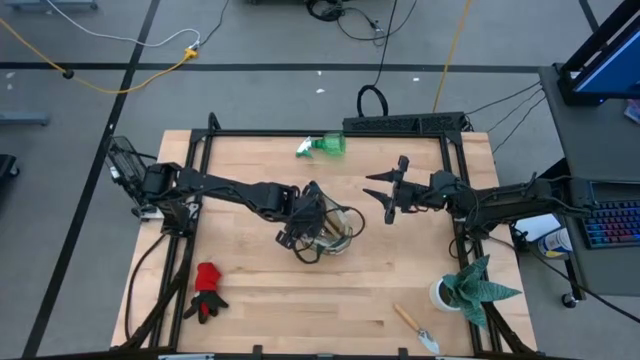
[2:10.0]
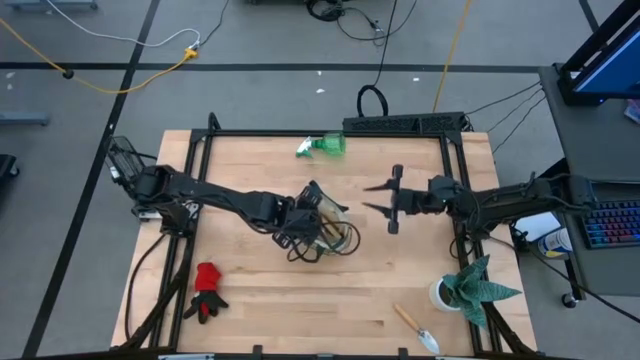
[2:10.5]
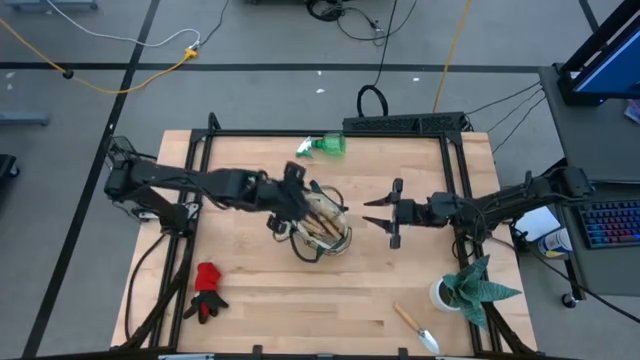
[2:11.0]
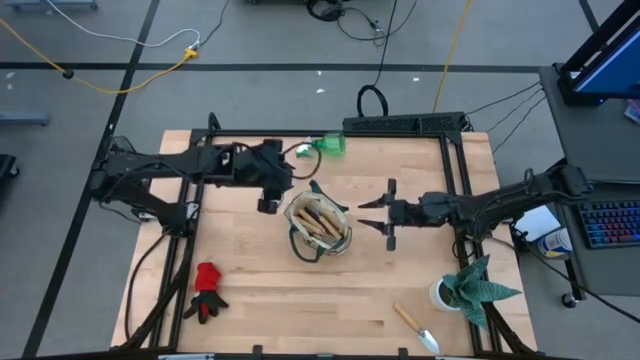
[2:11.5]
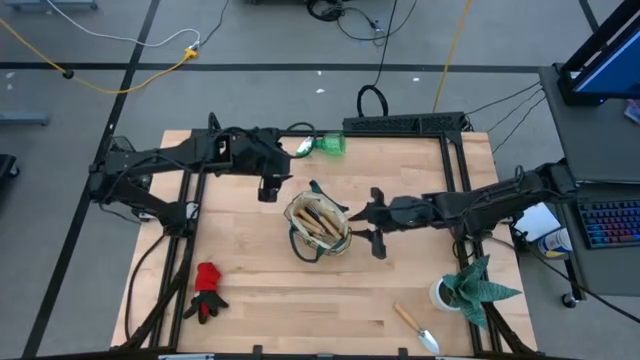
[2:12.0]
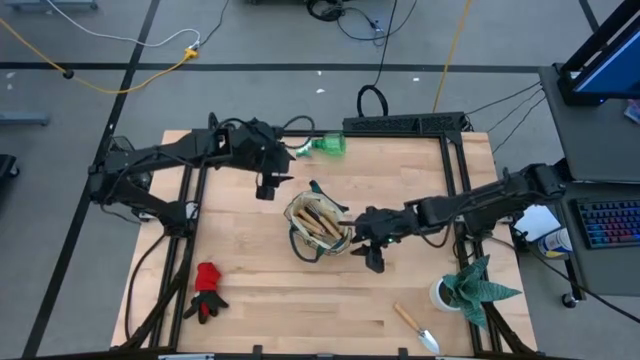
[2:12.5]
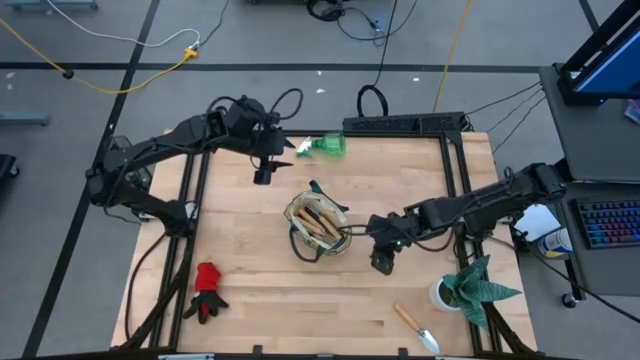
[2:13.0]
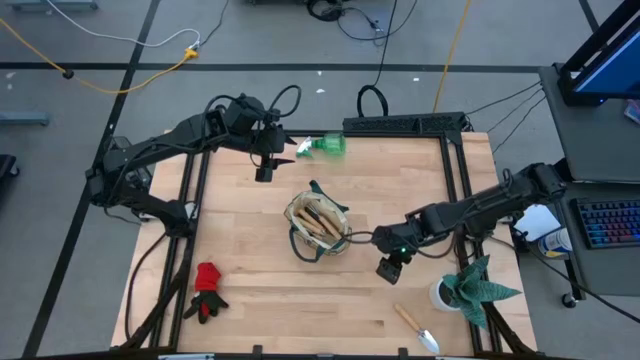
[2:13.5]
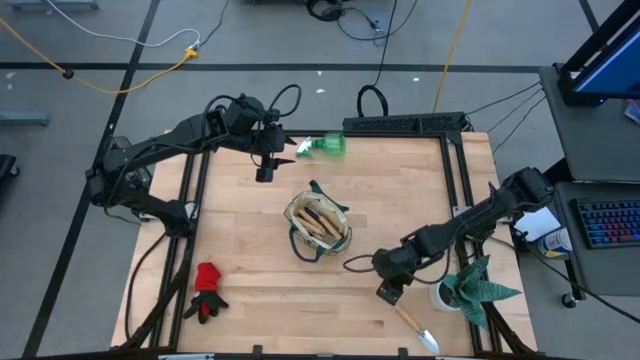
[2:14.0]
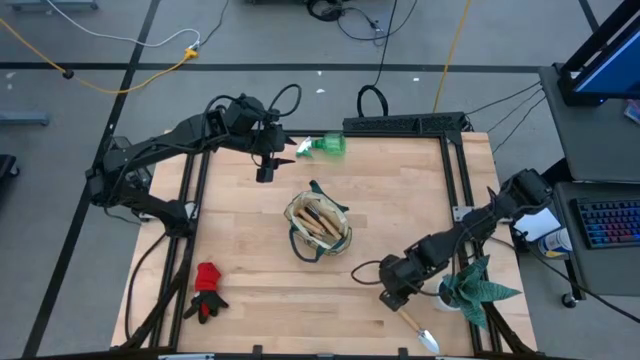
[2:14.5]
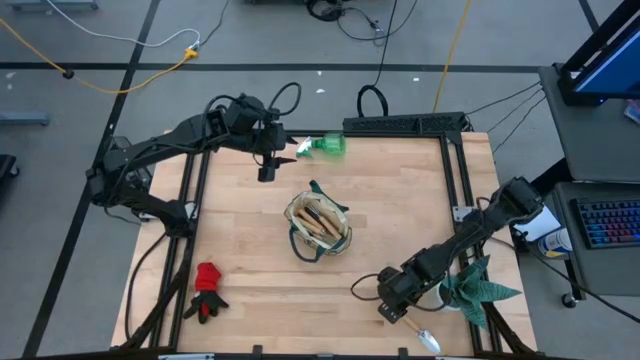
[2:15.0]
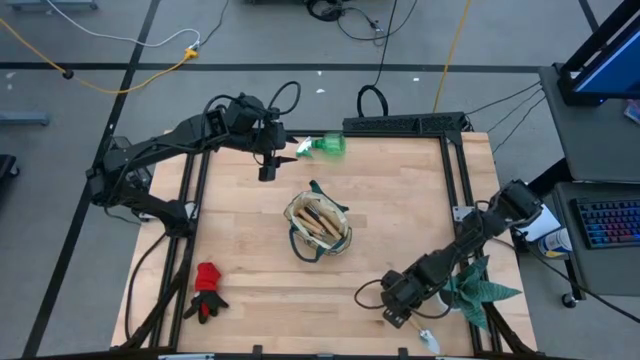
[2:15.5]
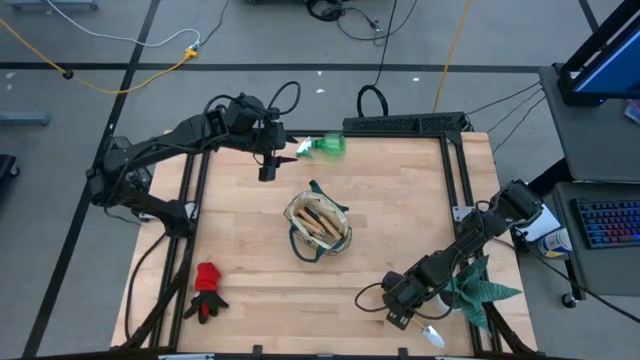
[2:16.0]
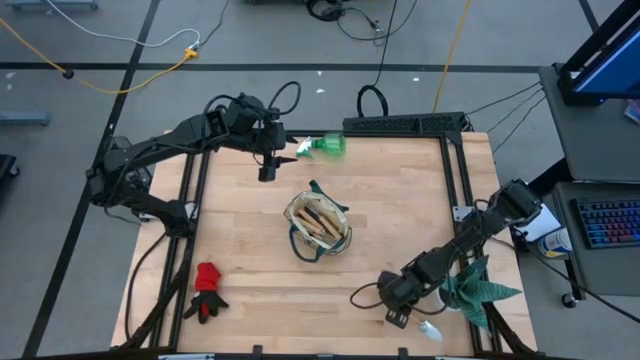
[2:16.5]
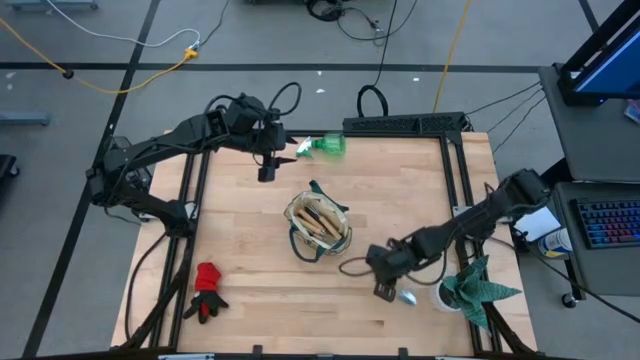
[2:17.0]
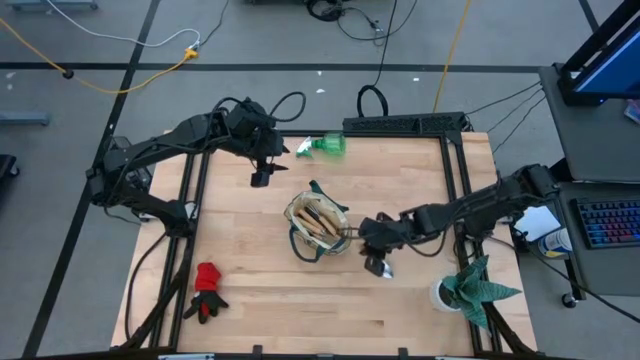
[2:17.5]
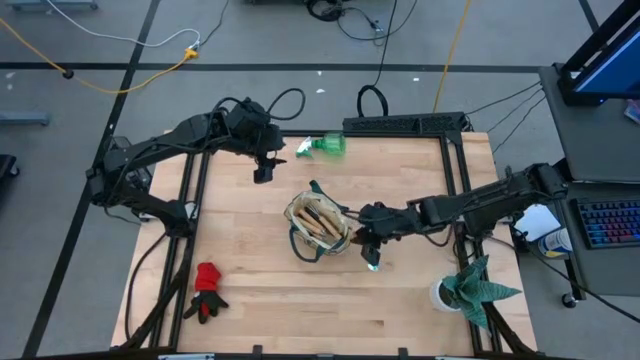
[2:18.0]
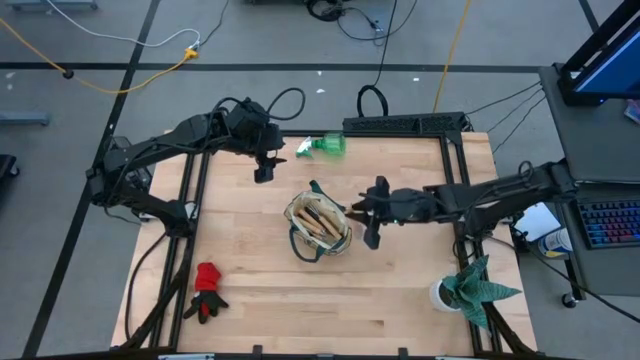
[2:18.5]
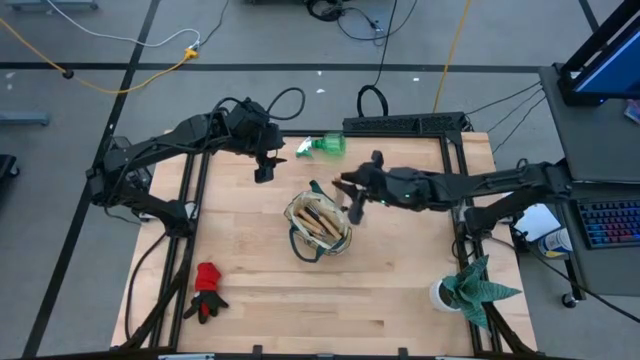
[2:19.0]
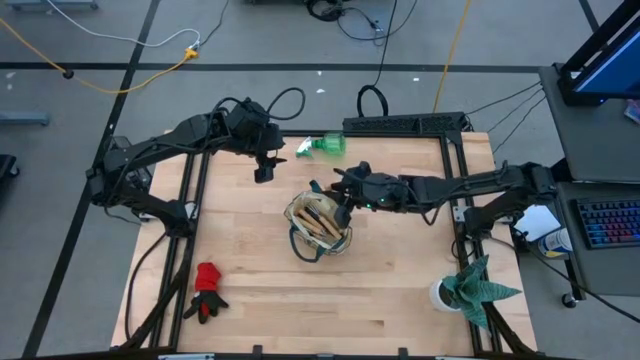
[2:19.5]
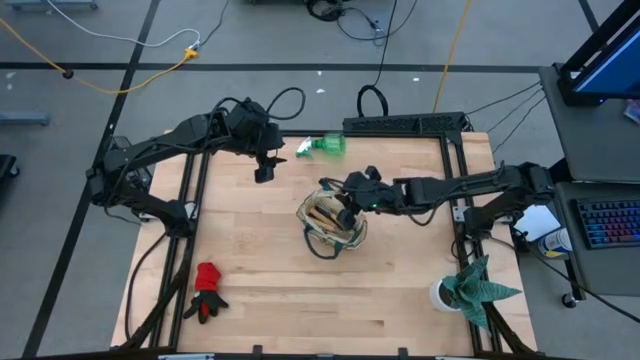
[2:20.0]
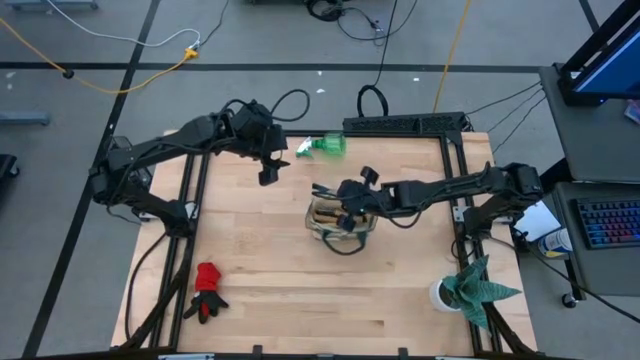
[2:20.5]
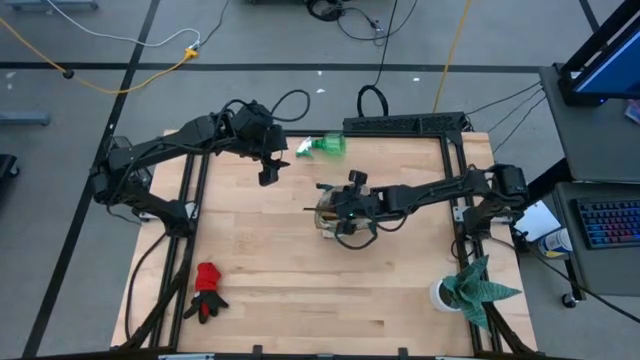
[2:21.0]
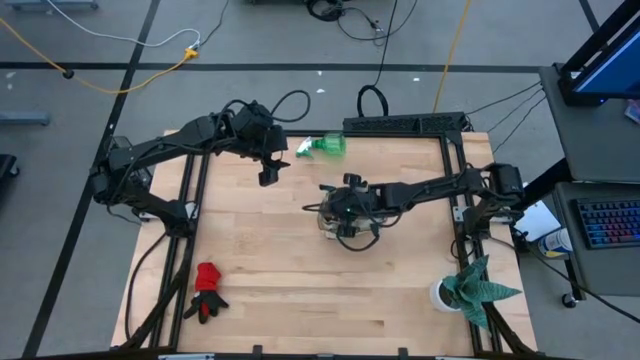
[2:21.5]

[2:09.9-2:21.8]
Task: Pick & Place Garden tools in Gardening bag
Put the brown trowel into the brown gardening bag

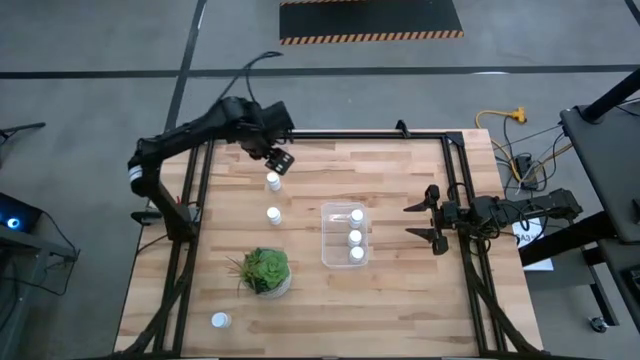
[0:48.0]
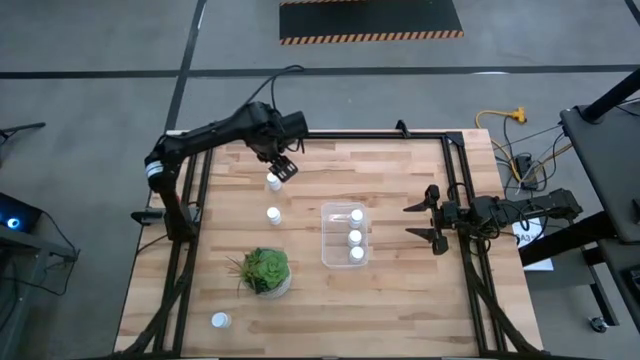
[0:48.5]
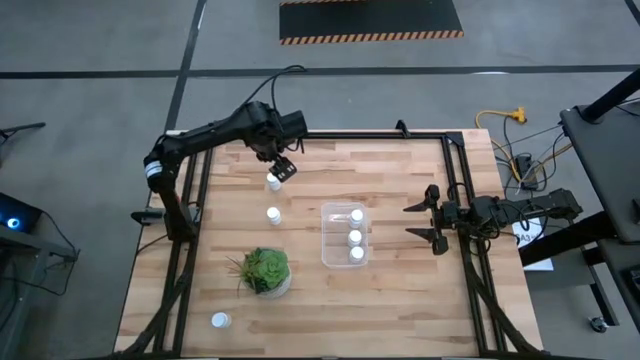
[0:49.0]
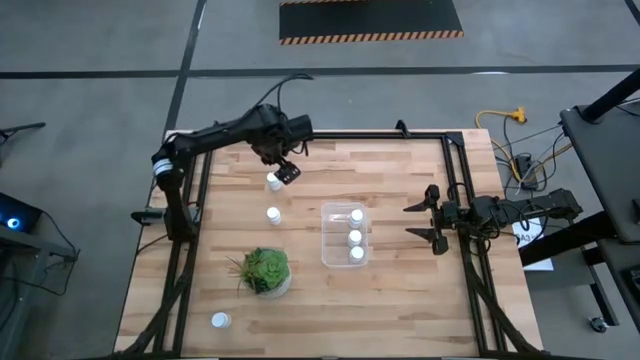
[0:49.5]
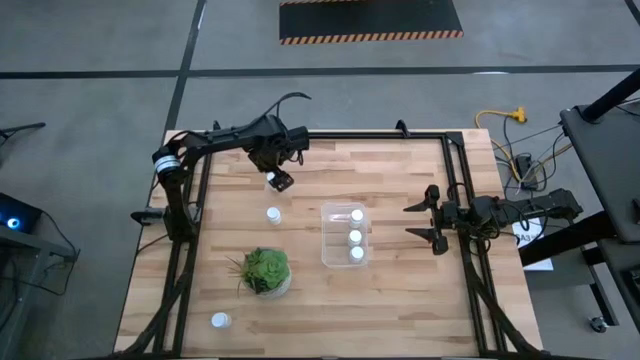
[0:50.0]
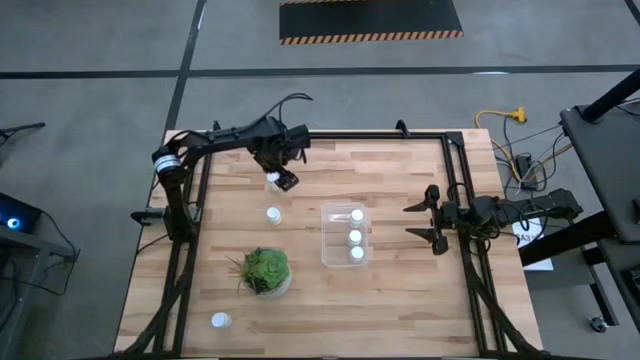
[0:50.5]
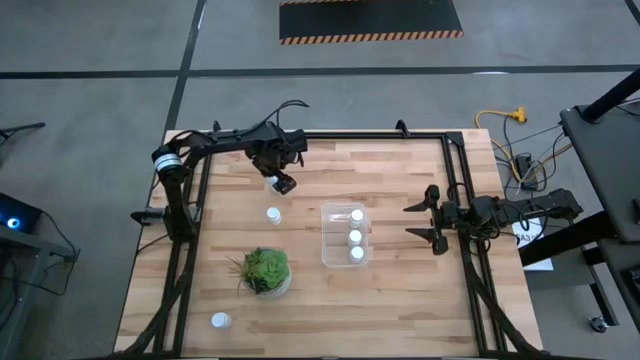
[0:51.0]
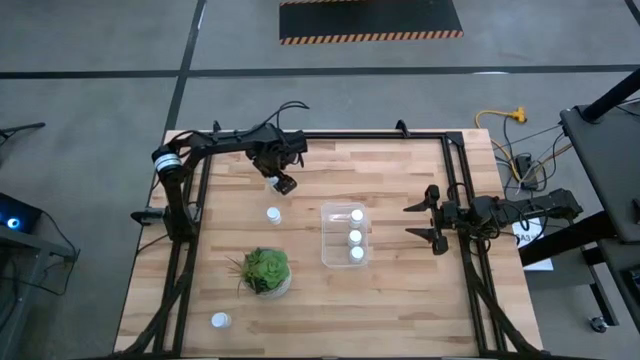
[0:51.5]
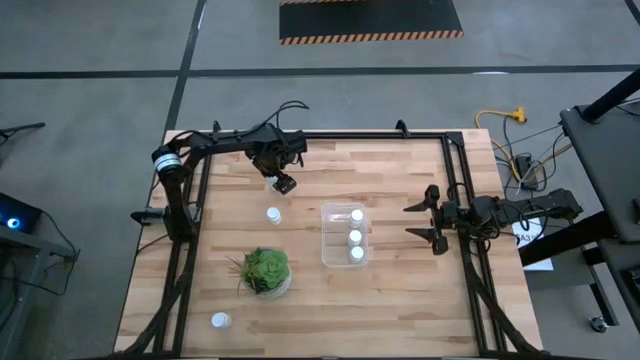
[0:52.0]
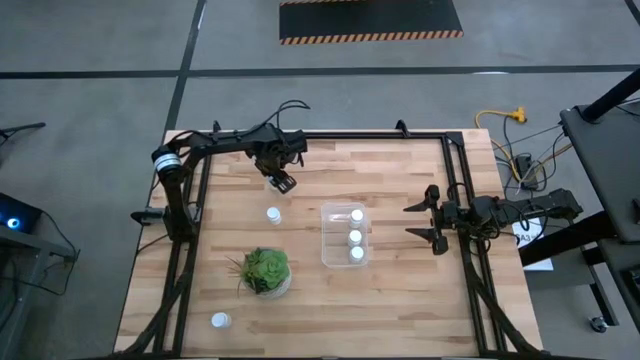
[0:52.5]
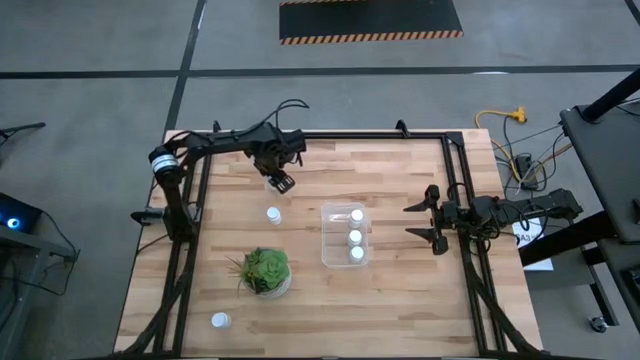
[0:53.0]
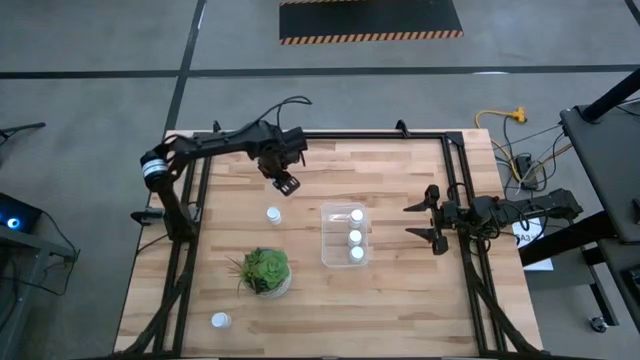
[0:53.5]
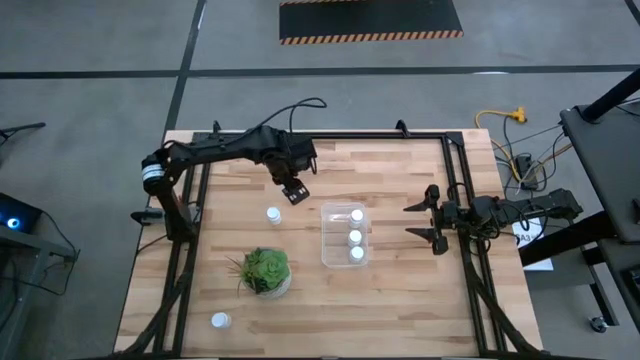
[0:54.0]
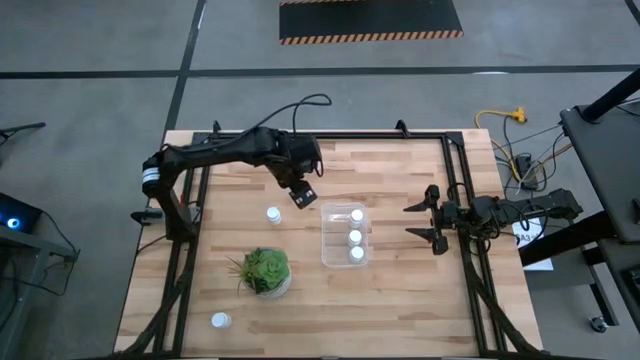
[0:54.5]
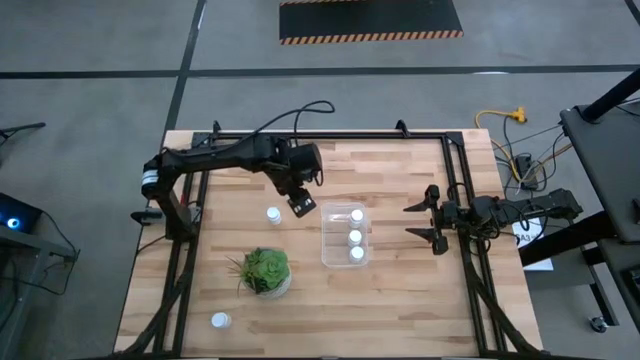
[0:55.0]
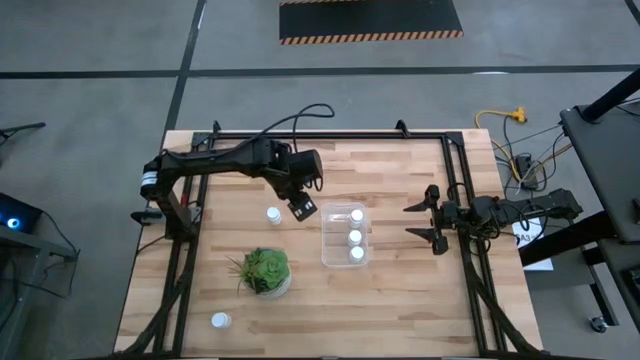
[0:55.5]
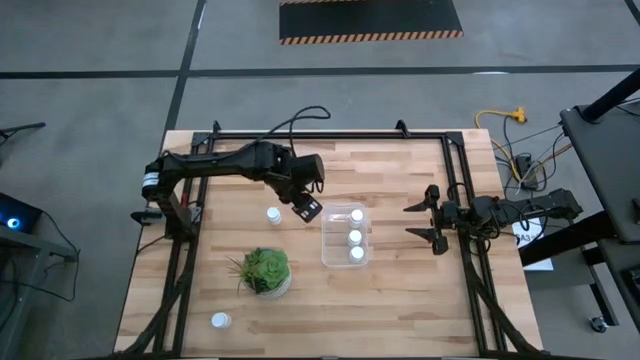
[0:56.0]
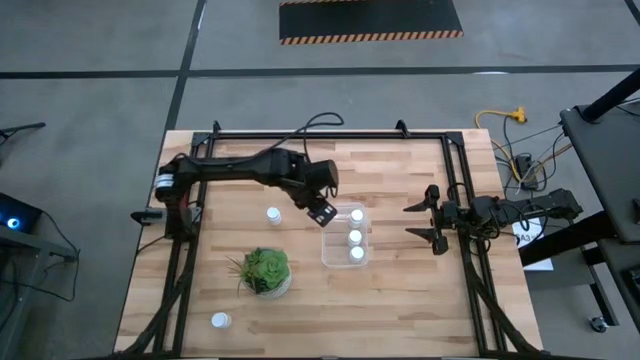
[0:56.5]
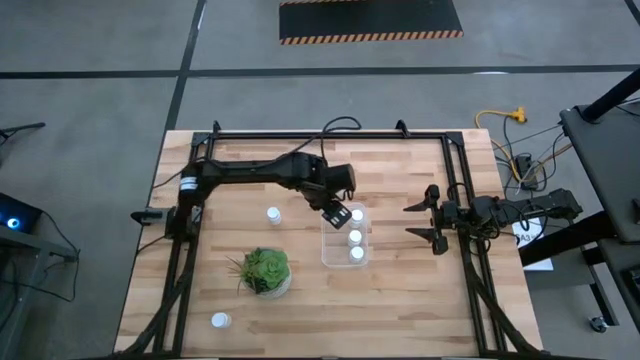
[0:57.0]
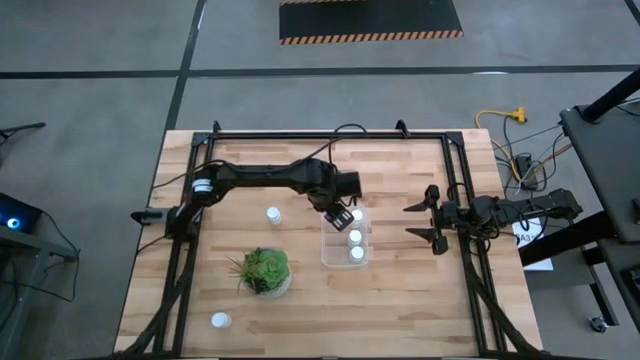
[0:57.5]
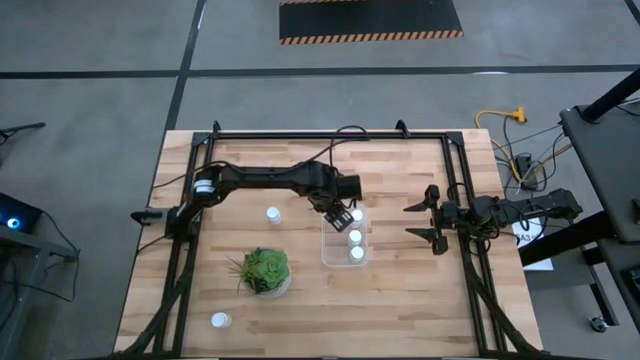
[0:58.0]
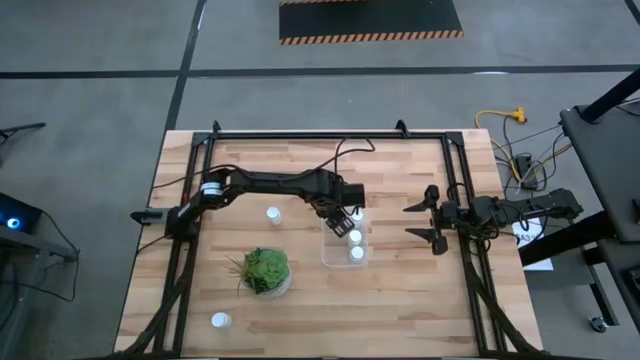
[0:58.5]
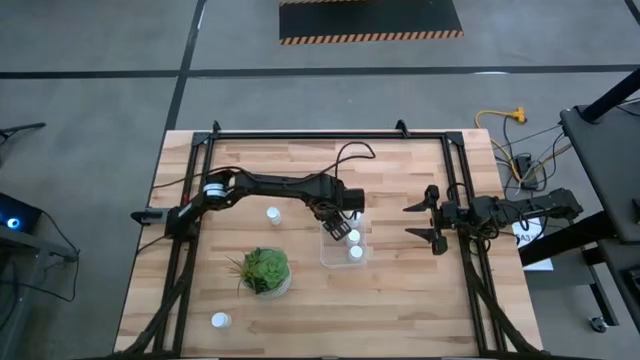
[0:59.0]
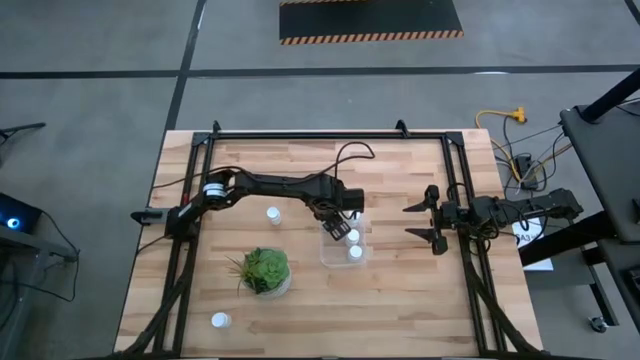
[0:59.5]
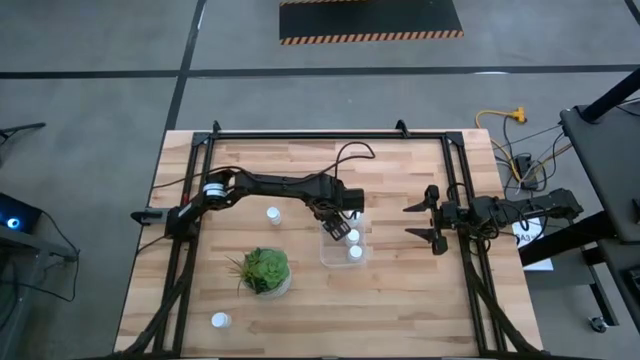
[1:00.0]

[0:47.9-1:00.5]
Task: Pick and place pill bottles into a basket
Put the white medicine bottle into the transparent bin
